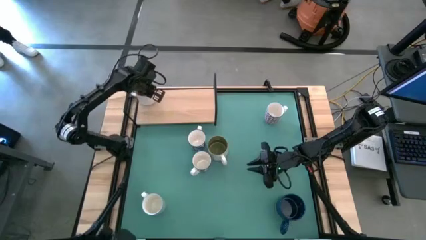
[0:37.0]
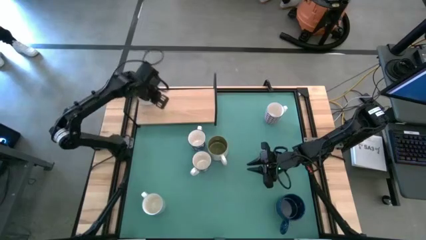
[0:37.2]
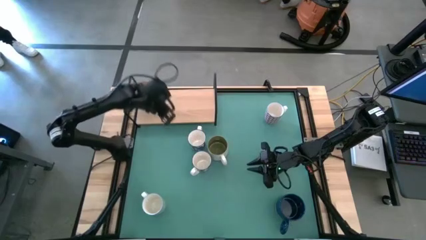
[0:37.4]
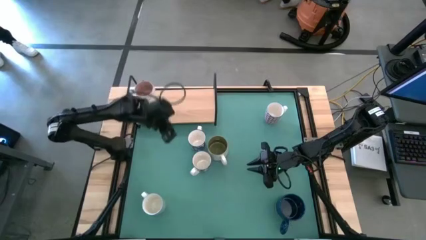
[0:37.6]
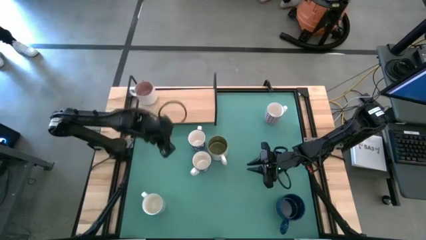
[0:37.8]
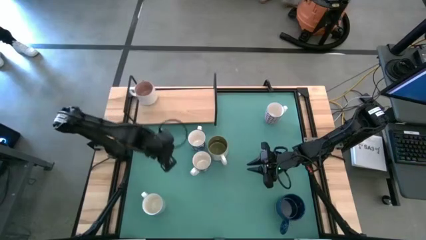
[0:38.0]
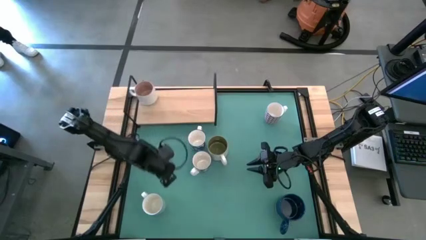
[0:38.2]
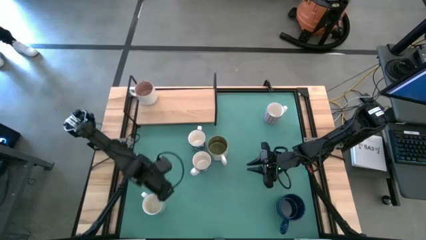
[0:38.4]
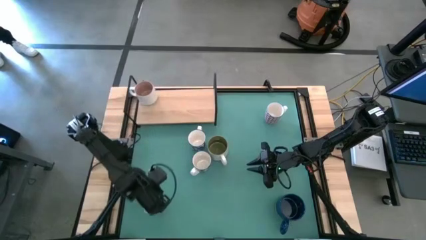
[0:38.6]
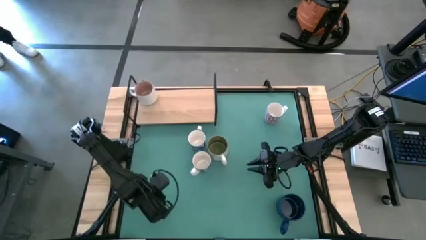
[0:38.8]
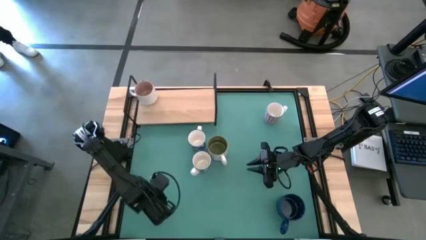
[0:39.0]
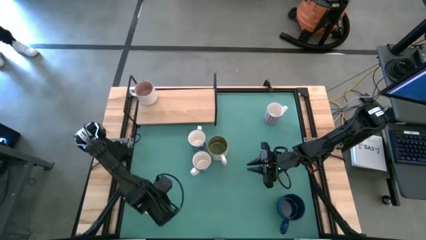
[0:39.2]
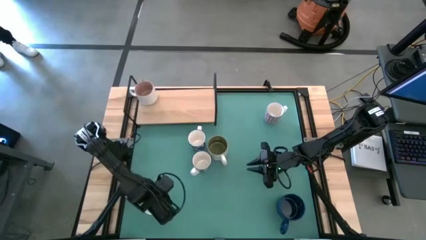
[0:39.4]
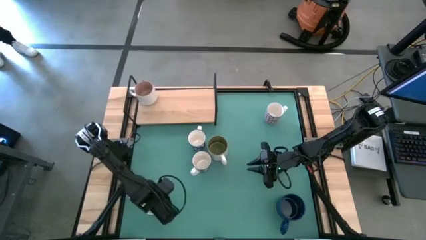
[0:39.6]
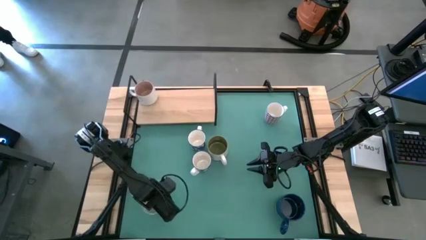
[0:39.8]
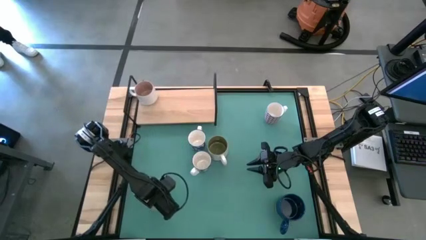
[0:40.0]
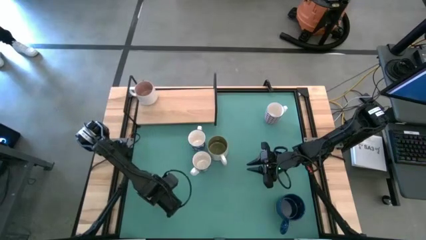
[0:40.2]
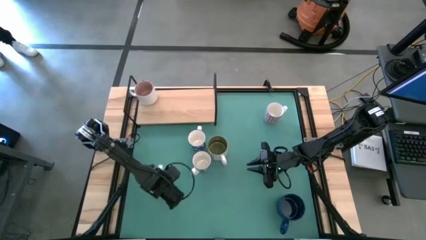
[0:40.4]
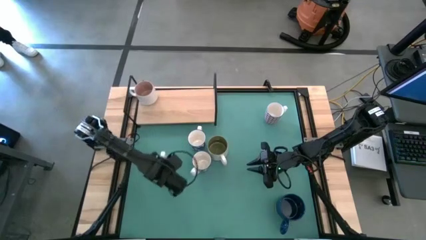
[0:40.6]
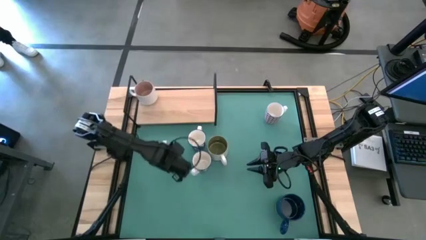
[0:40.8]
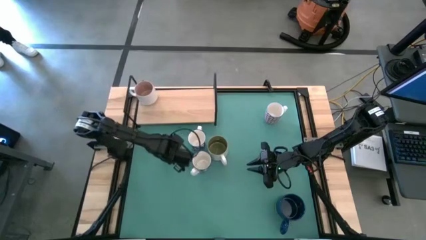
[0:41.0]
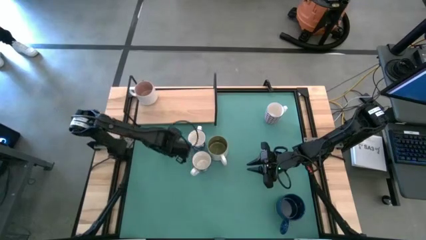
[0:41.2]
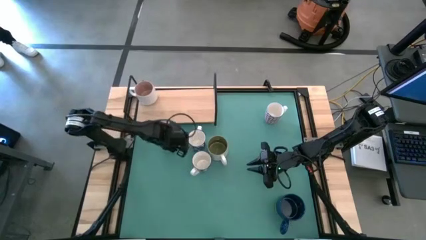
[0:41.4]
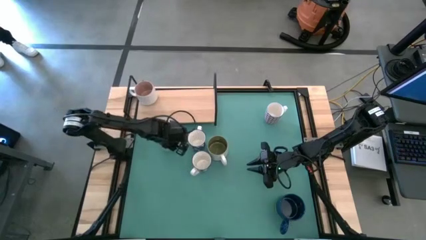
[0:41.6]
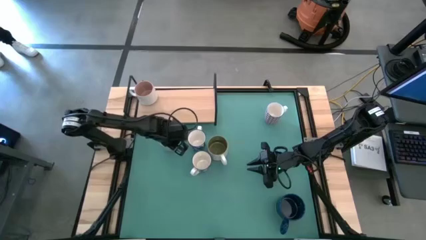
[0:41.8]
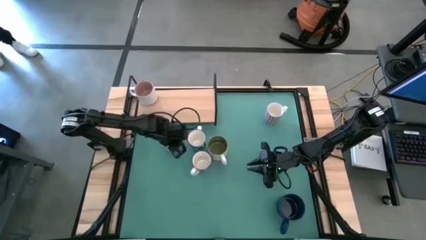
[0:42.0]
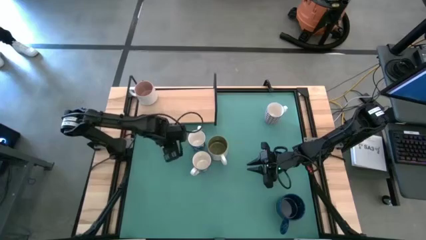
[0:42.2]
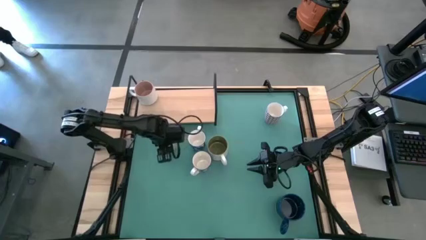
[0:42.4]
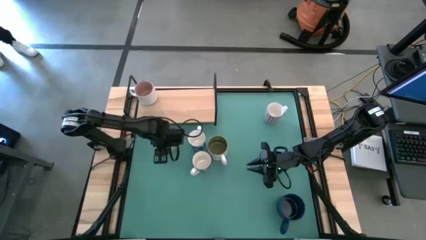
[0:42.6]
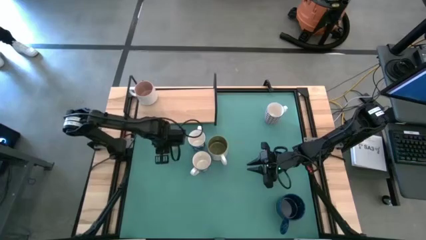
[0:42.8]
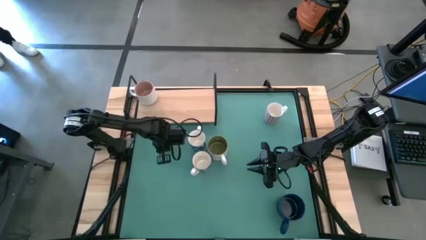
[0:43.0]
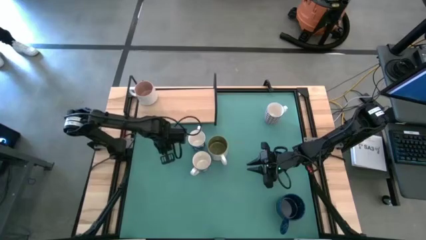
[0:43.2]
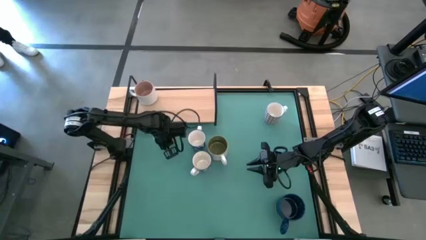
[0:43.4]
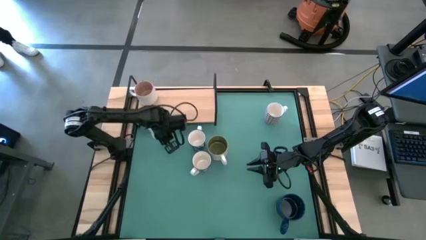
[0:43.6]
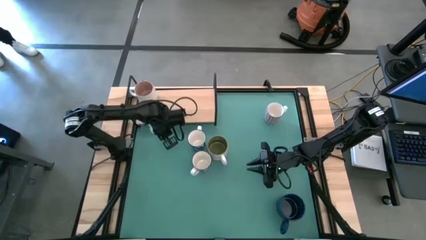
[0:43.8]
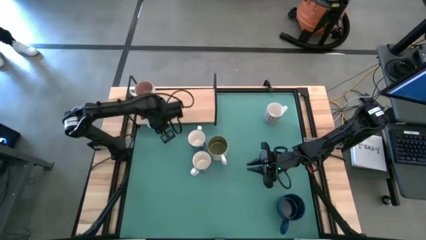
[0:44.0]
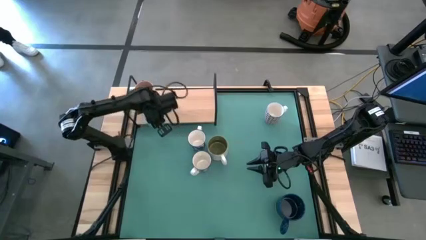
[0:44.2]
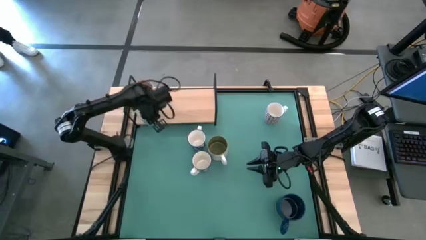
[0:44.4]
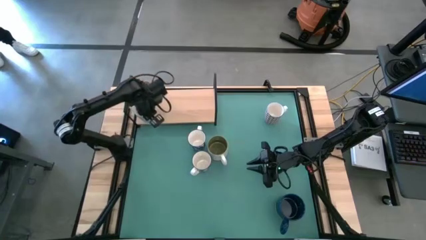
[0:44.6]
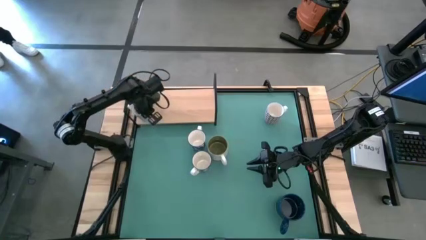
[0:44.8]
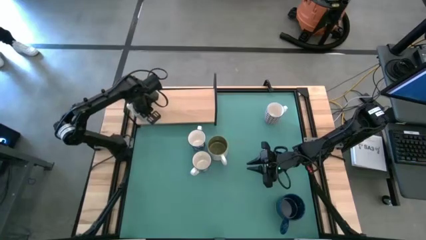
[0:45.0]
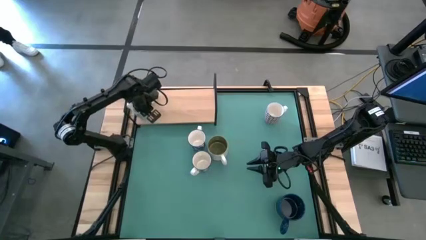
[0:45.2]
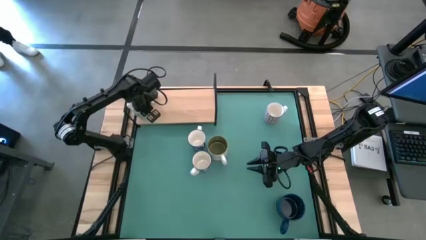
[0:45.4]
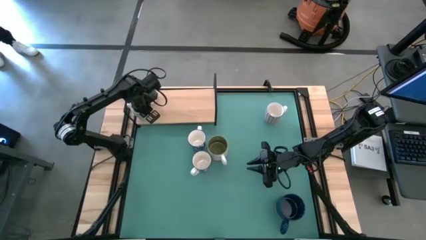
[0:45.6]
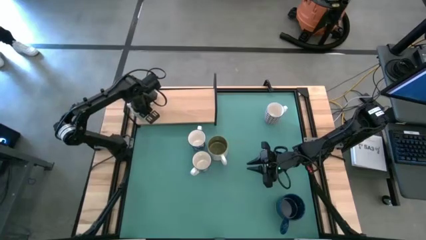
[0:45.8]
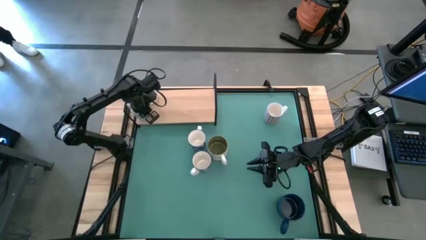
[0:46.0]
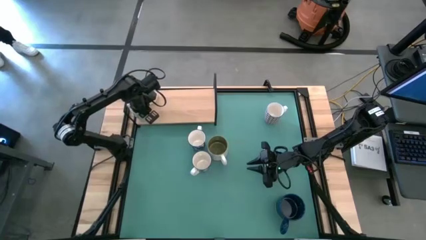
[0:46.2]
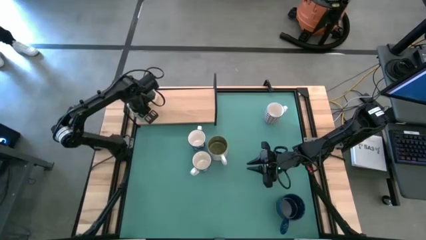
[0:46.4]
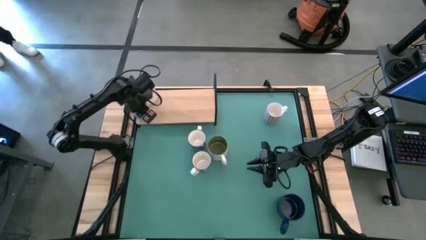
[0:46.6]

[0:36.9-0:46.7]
Task: Place coffee mugs
Put the green patterned mug on the shelf

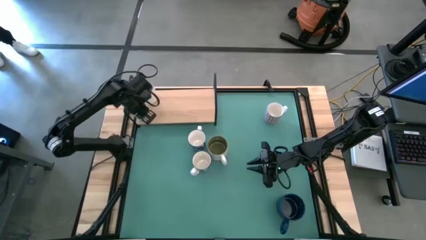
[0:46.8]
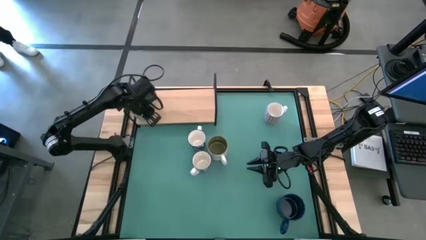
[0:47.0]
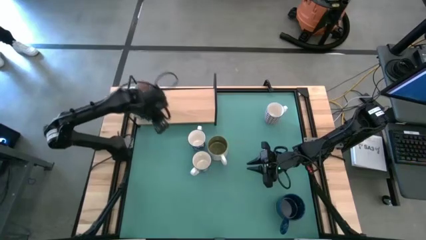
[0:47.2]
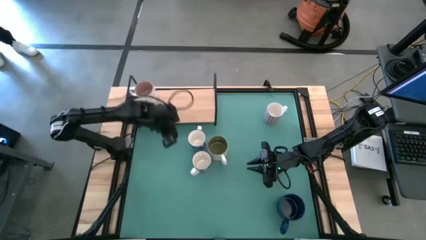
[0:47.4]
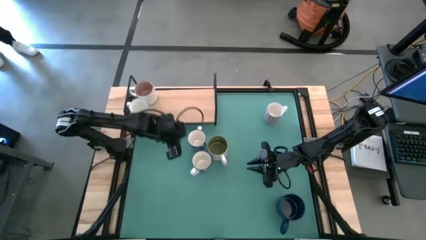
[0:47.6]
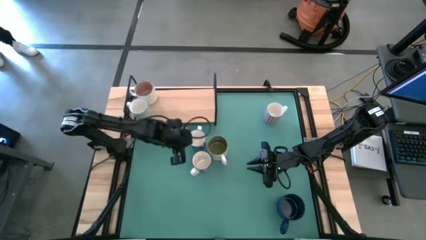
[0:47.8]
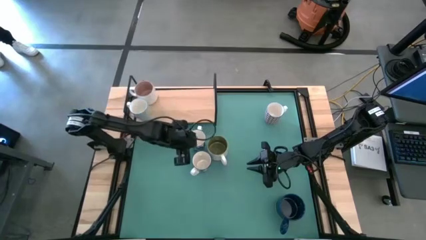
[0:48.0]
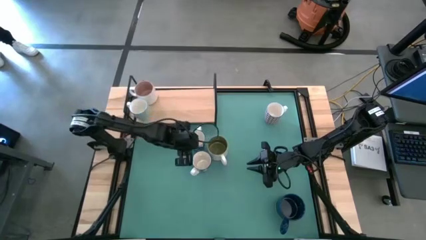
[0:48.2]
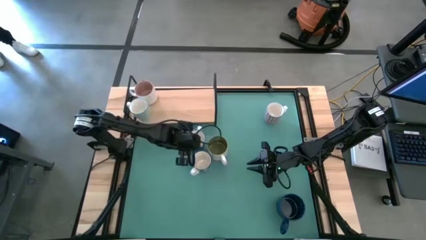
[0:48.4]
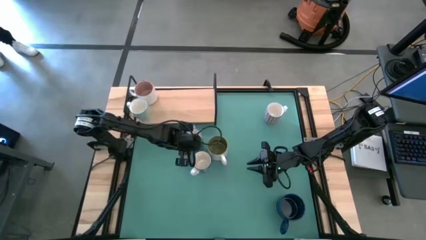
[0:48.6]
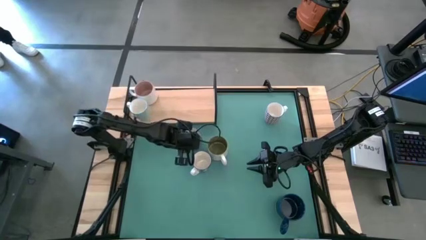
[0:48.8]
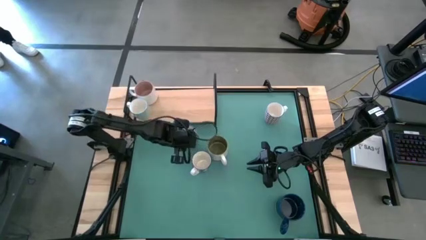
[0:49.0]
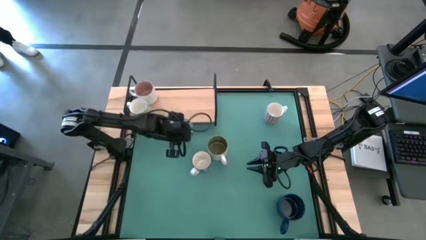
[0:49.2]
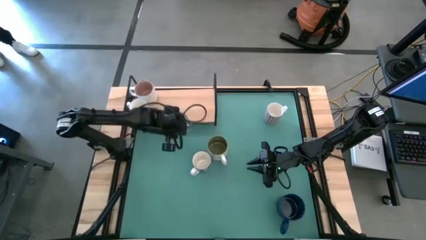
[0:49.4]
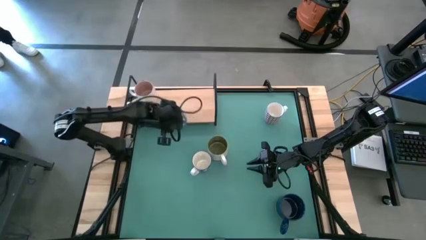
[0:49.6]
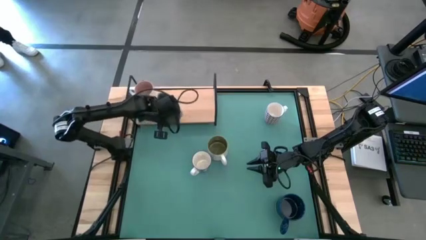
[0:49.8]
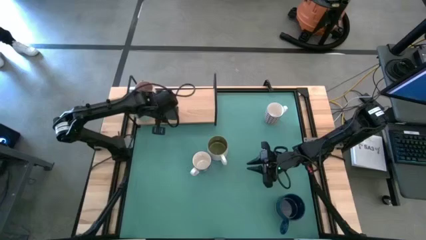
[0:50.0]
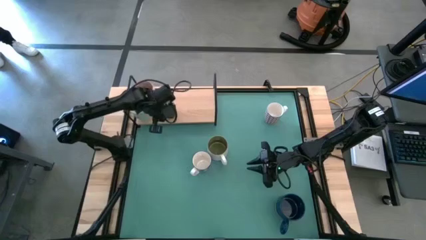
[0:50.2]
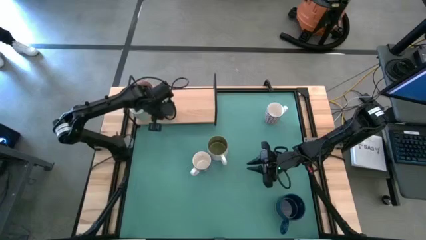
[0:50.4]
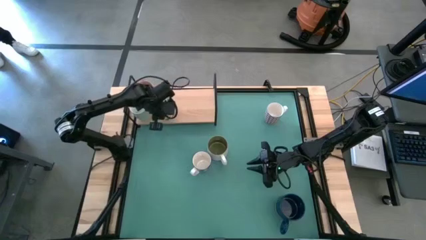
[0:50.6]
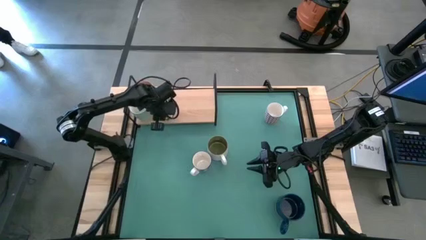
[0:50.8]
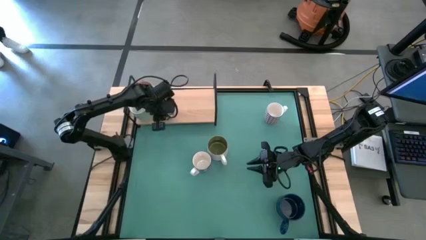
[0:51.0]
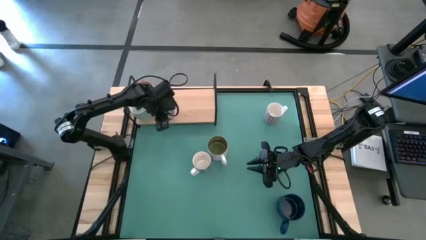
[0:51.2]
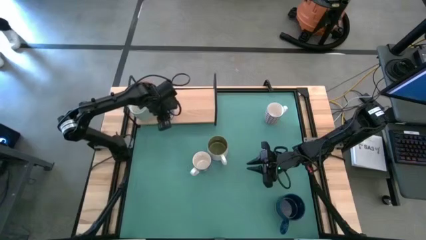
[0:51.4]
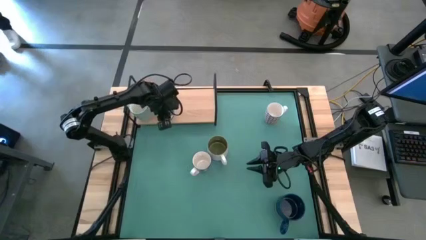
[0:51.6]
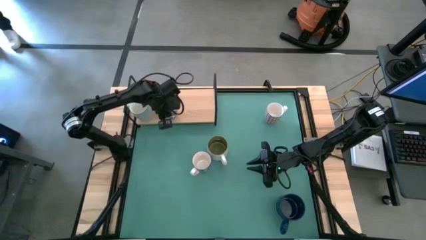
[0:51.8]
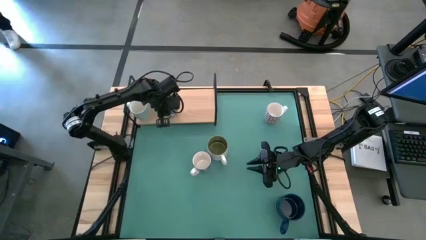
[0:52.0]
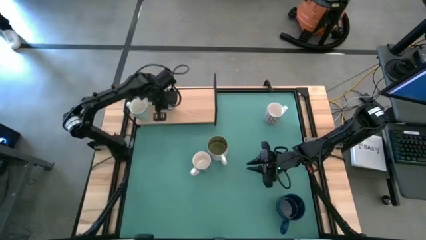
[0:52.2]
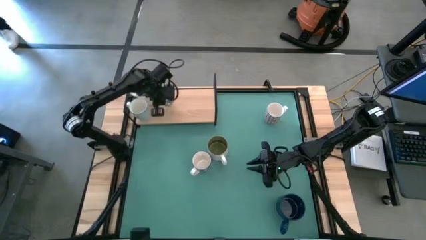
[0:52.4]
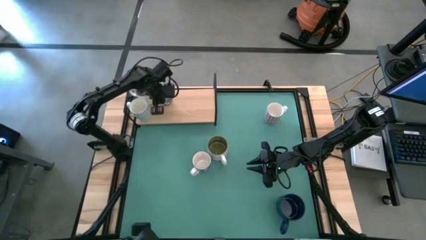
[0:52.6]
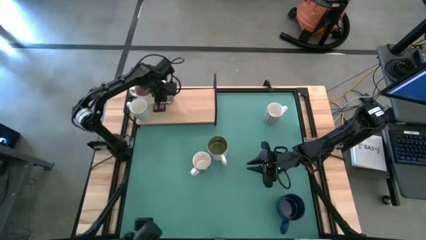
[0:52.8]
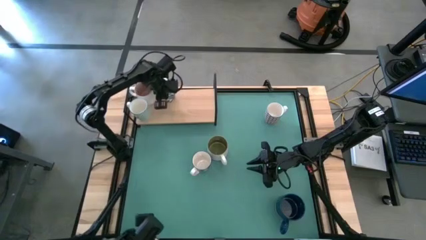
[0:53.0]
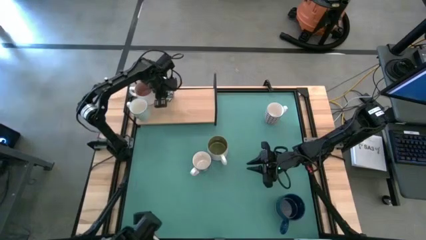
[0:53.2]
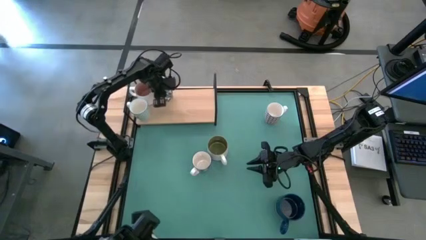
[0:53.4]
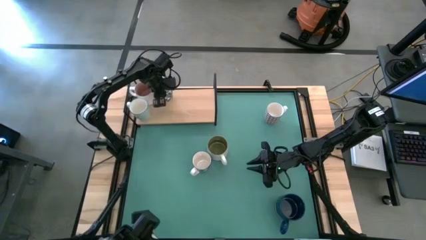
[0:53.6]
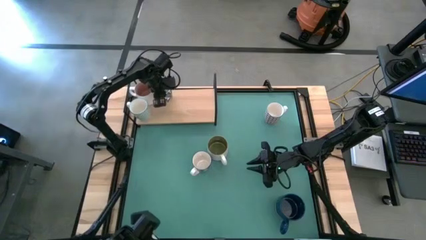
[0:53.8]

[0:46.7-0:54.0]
Put the top blue patterned mug on the shelf
